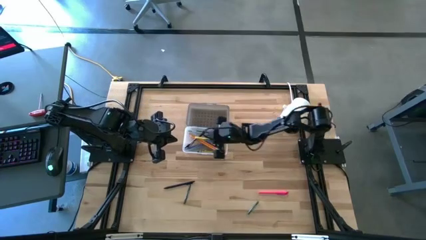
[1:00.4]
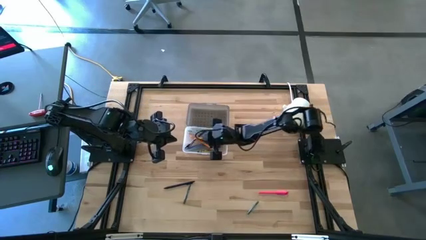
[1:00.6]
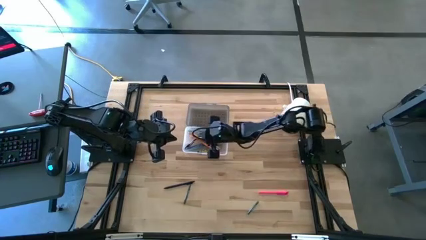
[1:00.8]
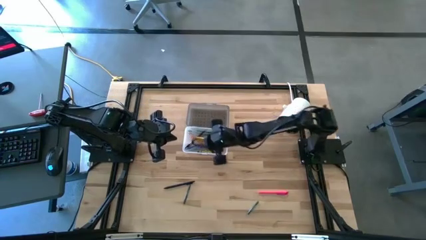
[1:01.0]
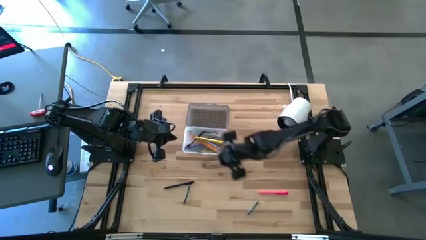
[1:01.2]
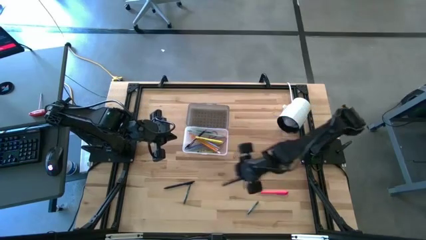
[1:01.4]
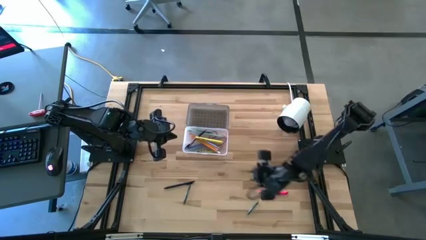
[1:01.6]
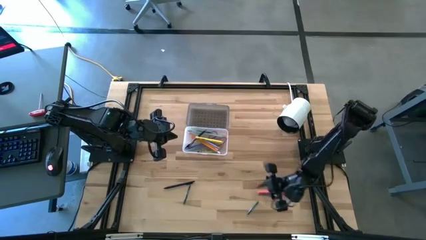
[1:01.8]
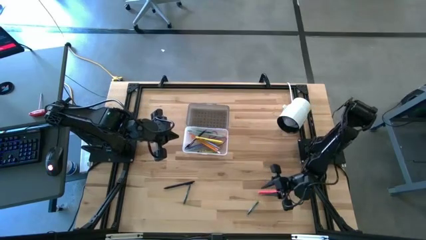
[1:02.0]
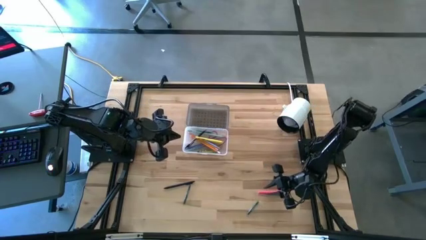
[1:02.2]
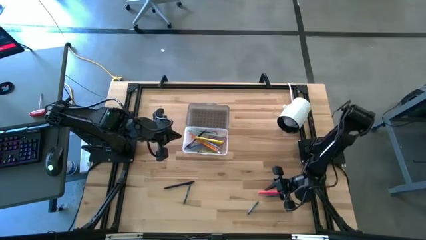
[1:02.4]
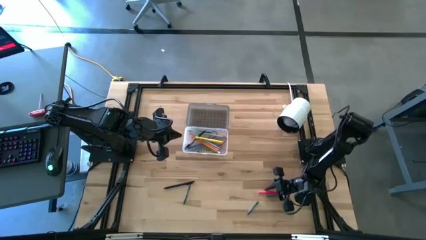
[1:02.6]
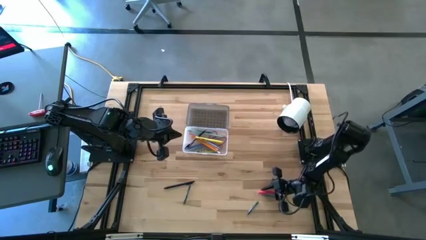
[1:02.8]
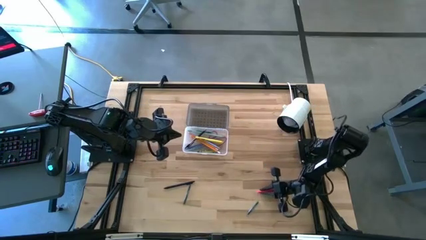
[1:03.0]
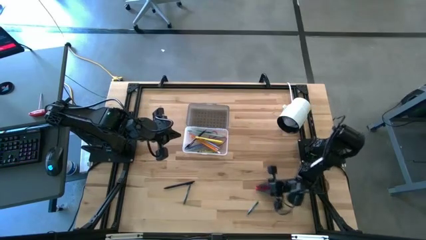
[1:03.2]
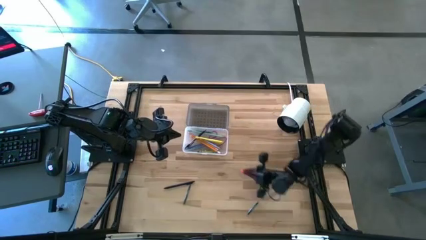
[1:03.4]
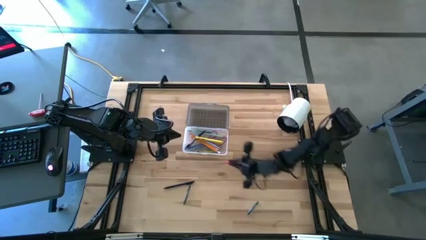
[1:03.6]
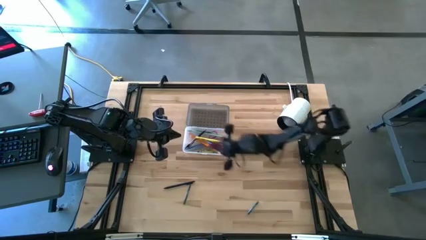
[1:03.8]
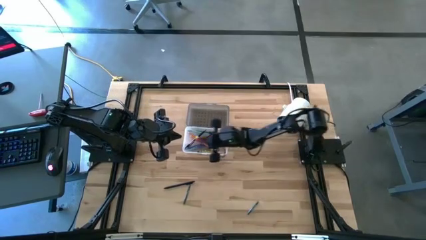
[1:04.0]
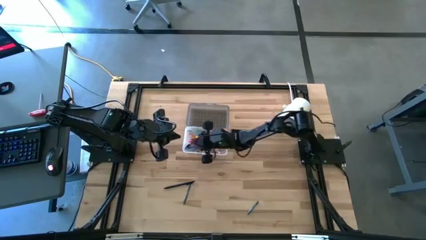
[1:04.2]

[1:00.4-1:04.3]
Task: Pick & place school supplies into a supply box
Put the pink pen into the black box

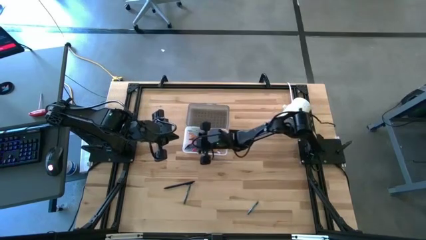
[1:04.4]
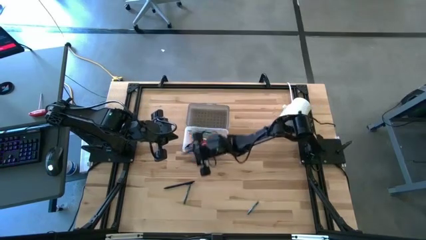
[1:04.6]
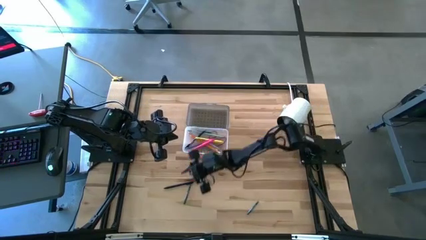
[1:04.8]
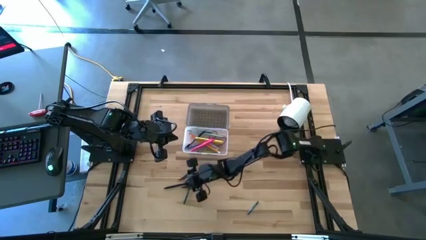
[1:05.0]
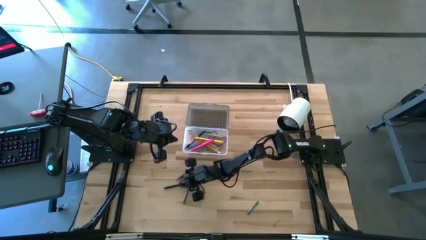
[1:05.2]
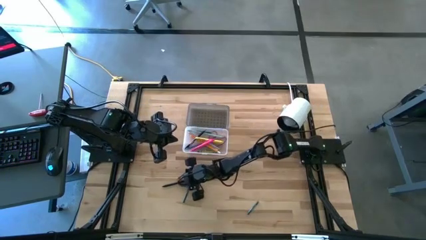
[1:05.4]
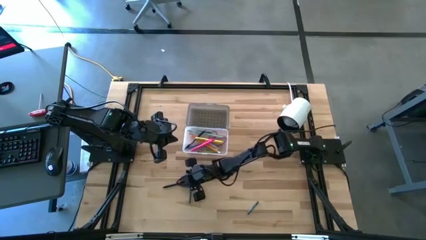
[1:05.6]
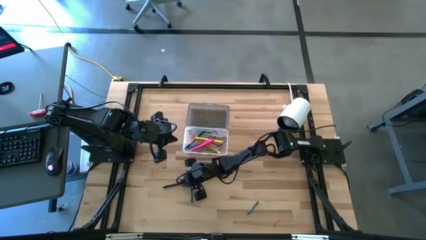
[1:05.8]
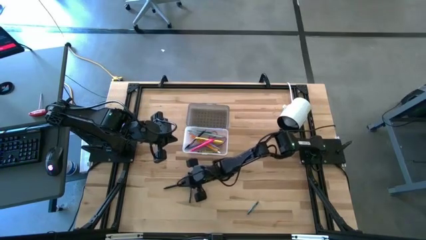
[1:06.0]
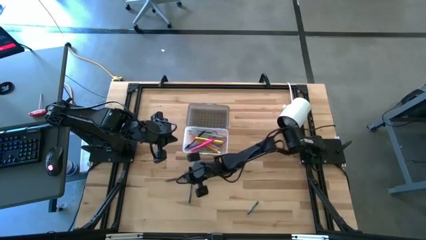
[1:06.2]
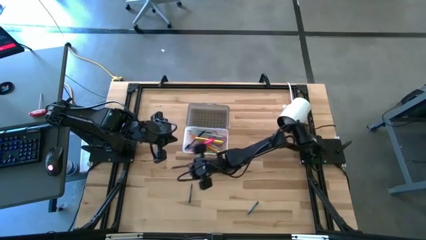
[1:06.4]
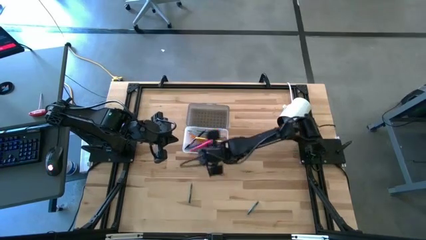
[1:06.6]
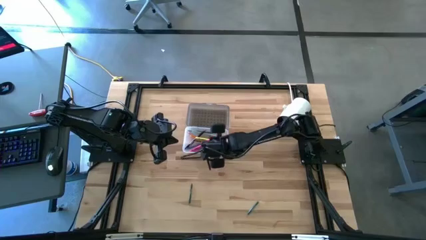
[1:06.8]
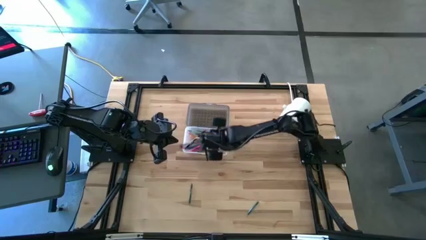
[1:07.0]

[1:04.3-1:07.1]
Put the black pen into the black box

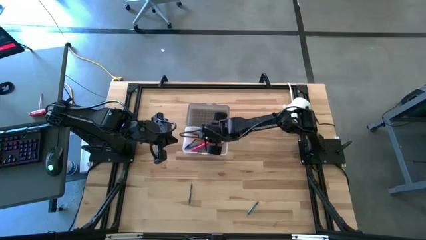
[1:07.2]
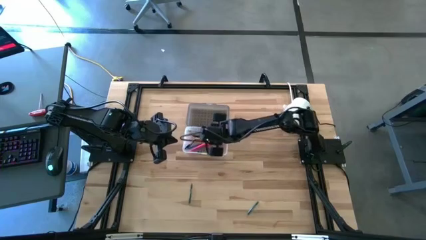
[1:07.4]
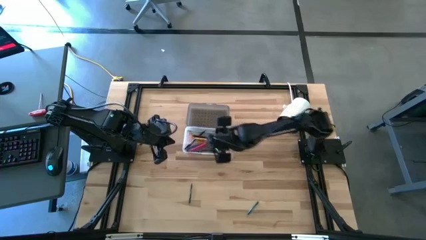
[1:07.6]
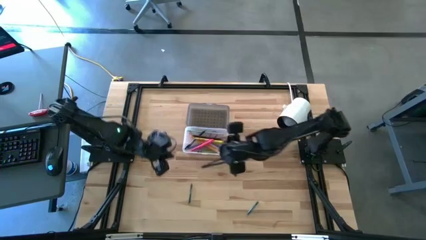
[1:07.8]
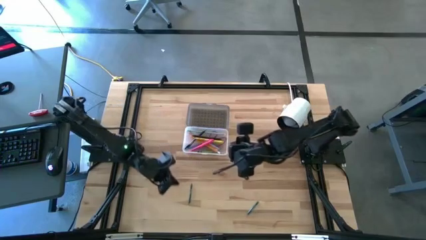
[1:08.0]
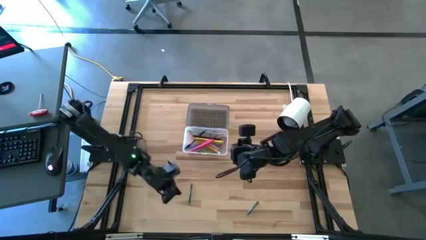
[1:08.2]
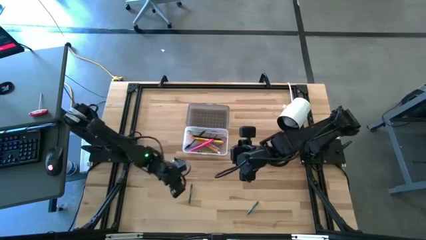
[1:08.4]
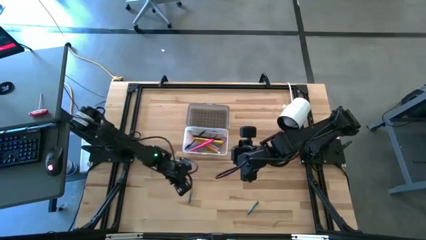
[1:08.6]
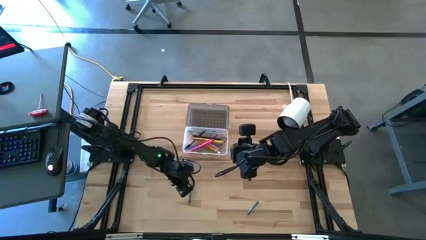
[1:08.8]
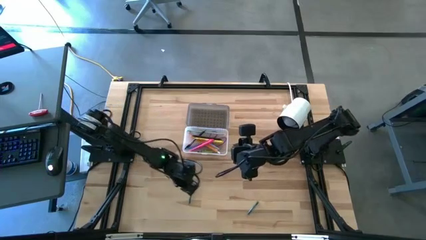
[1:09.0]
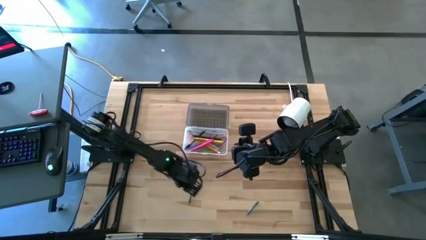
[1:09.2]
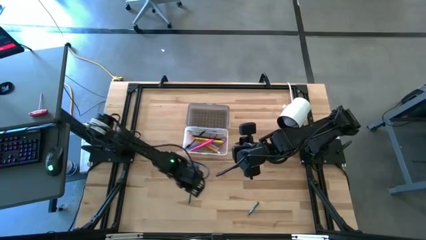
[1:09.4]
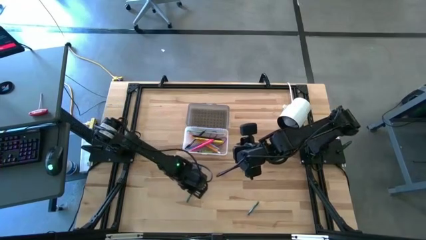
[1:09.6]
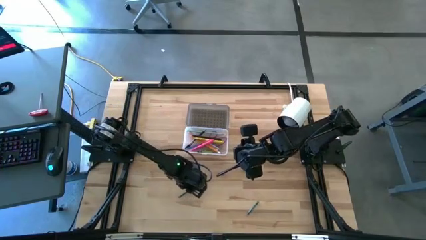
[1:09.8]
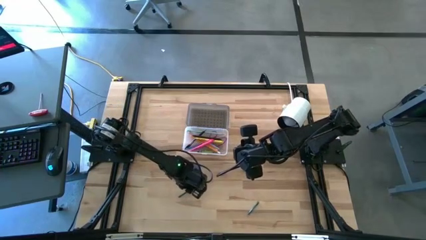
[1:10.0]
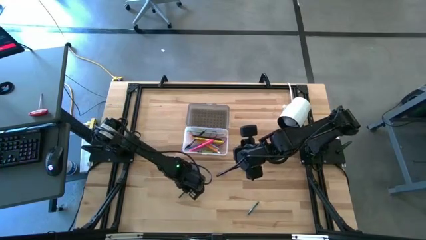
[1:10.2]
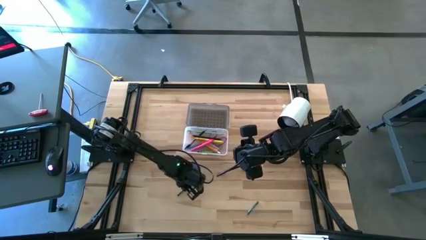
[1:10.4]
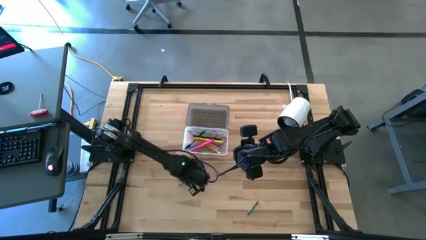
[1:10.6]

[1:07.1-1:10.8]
Put the left dark green crayon into the black box

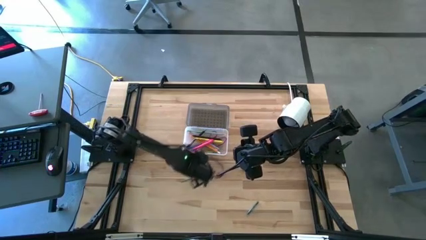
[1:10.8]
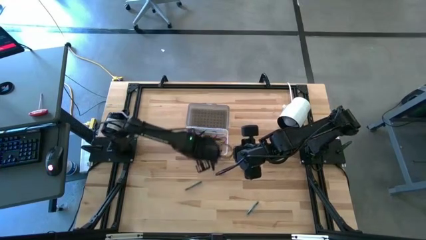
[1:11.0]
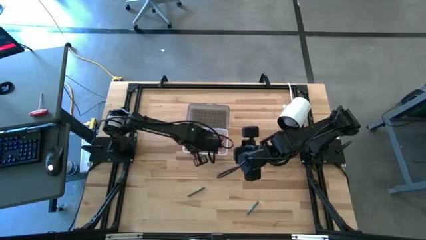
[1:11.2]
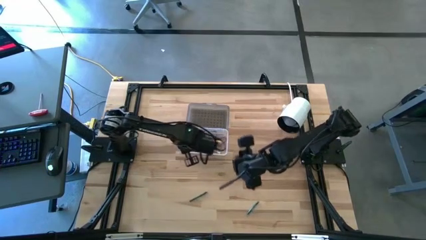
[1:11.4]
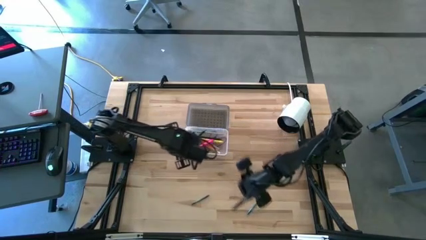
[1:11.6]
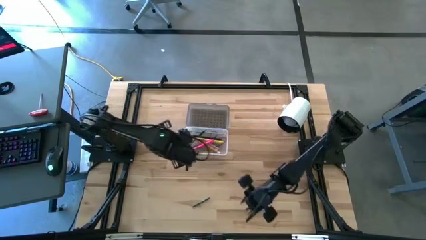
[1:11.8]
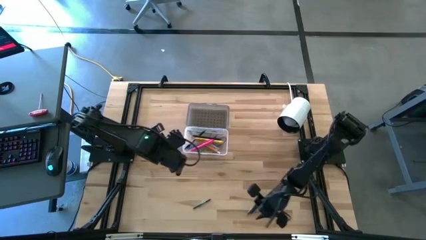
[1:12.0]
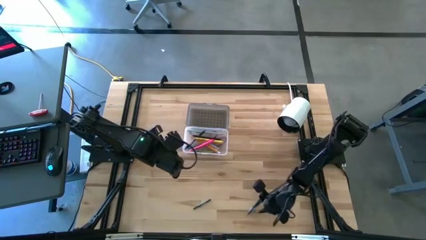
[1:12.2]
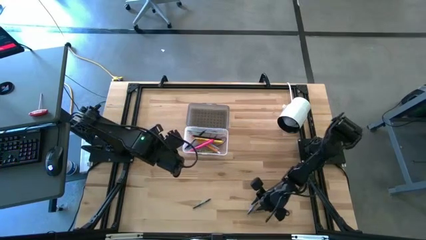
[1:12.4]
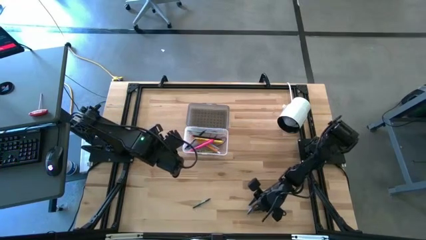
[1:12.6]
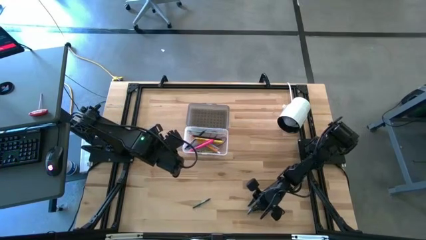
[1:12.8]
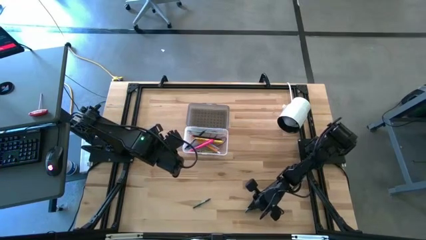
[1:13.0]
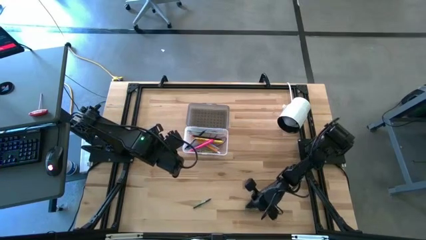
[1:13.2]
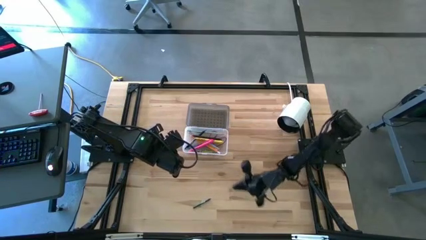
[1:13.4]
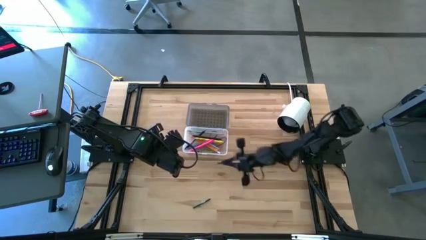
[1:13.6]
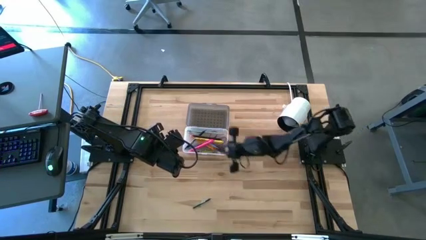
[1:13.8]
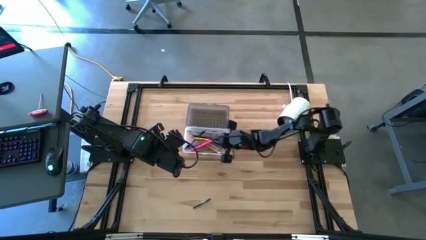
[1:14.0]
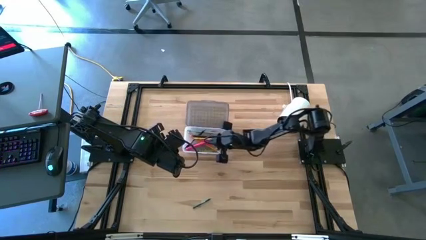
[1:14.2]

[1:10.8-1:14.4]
Put the right dark green crayon into the black box

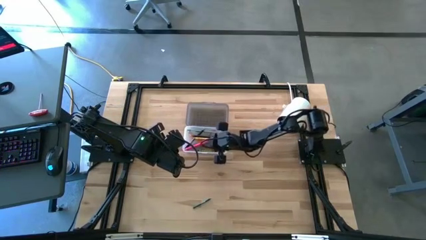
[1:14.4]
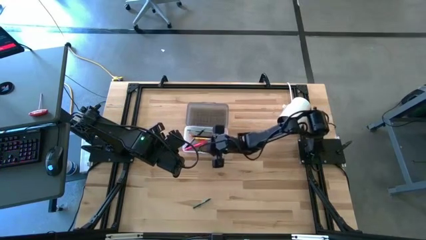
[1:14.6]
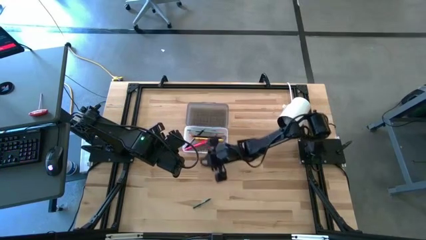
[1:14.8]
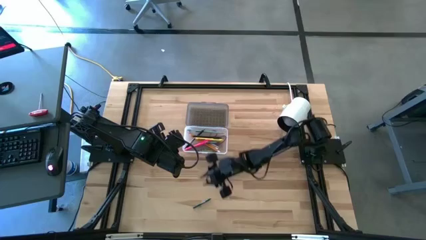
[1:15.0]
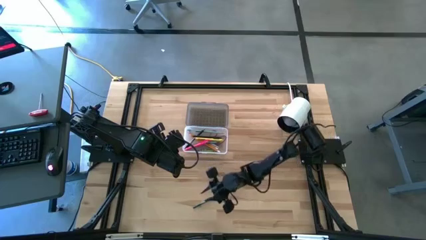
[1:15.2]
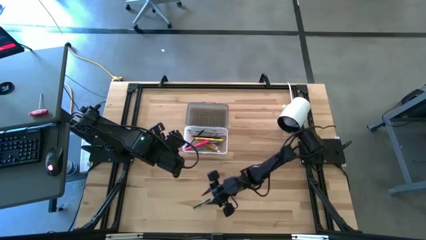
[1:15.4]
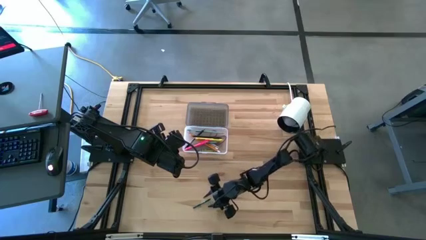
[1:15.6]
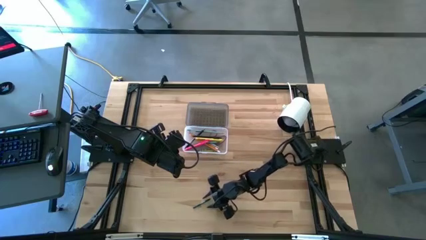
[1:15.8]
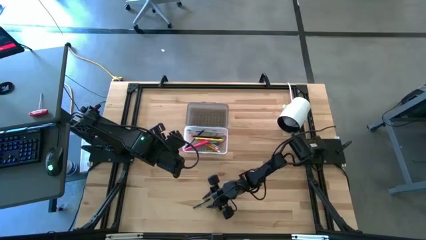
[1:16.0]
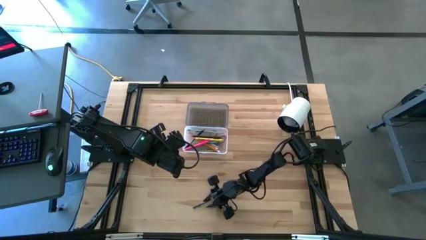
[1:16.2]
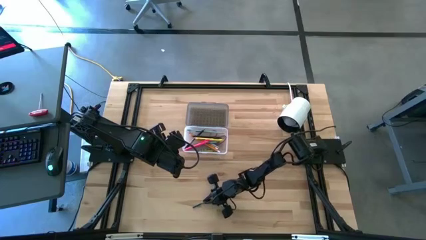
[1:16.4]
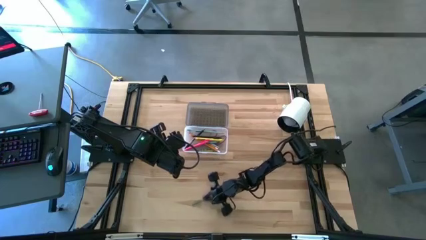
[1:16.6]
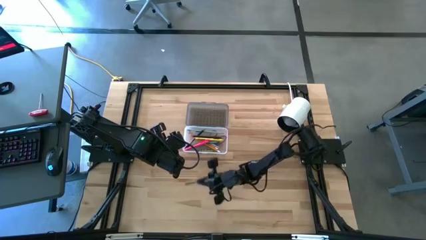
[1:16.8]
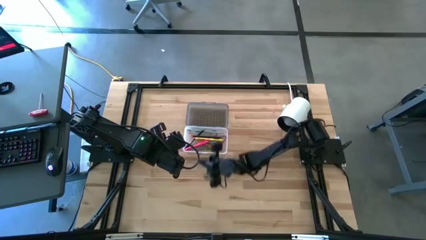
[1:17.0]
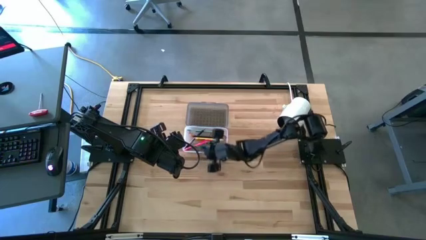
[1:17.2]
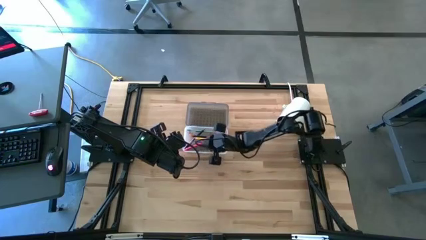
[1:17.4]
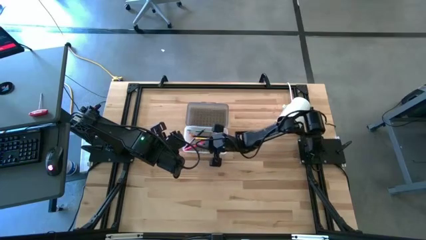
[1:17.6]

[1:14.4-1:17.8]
Put the dark green crayon into the black box
